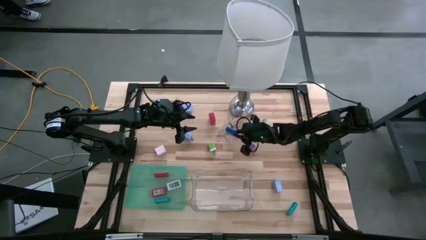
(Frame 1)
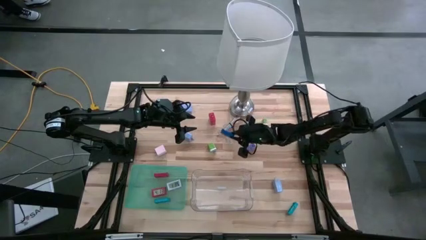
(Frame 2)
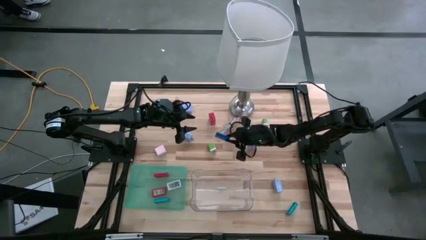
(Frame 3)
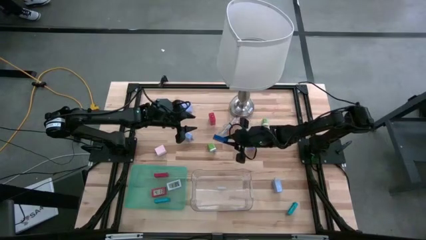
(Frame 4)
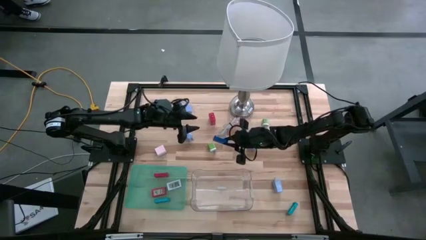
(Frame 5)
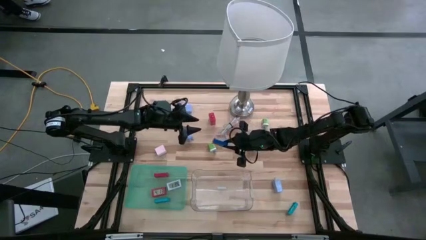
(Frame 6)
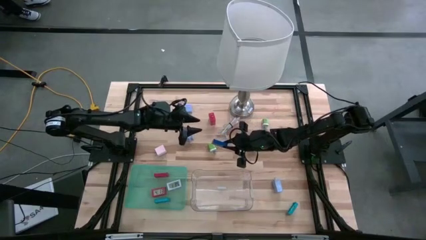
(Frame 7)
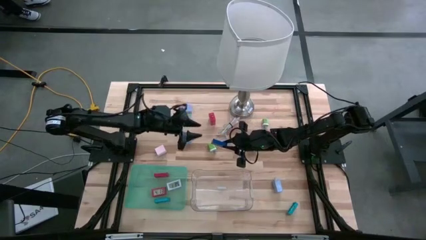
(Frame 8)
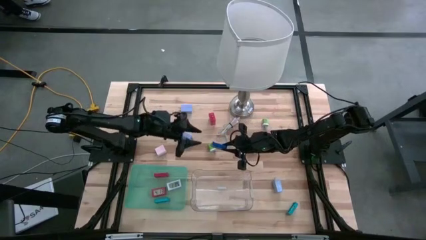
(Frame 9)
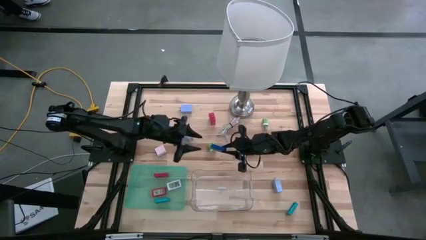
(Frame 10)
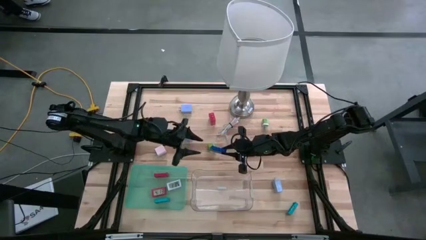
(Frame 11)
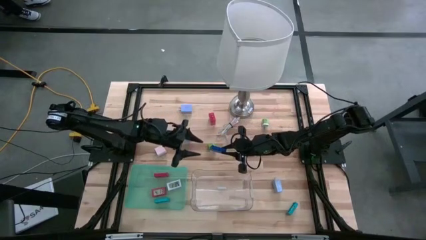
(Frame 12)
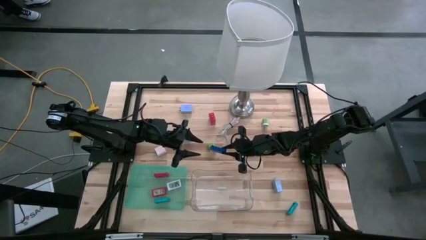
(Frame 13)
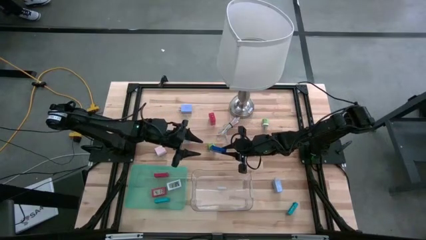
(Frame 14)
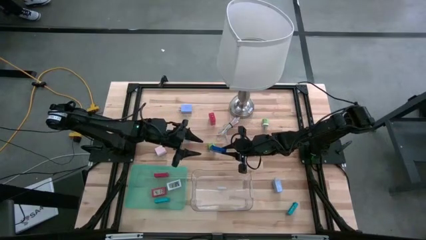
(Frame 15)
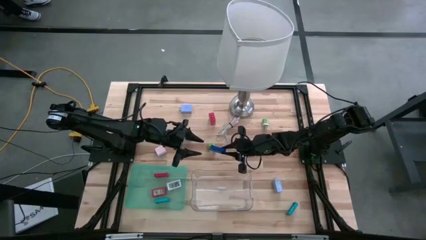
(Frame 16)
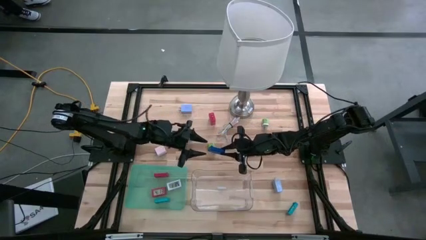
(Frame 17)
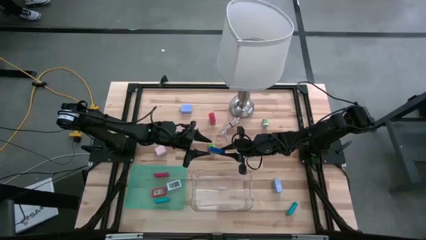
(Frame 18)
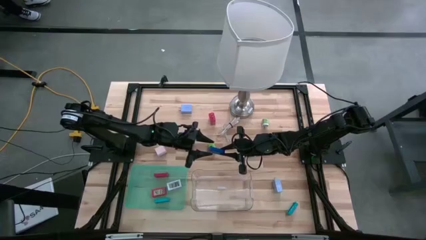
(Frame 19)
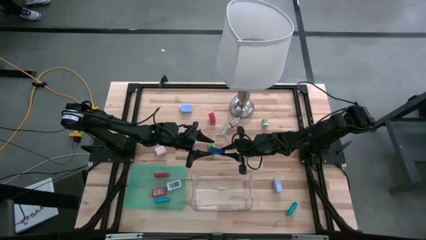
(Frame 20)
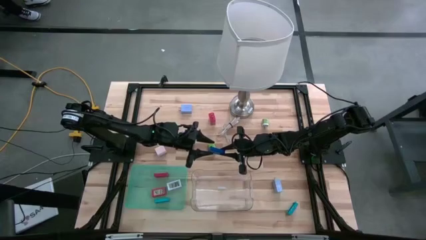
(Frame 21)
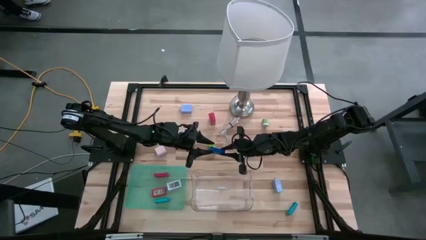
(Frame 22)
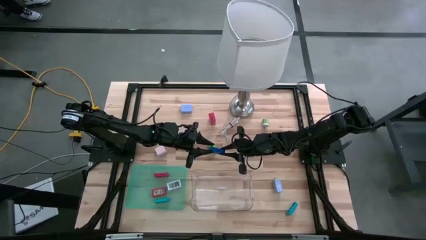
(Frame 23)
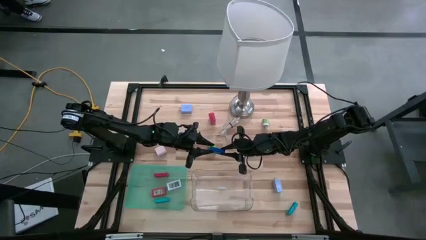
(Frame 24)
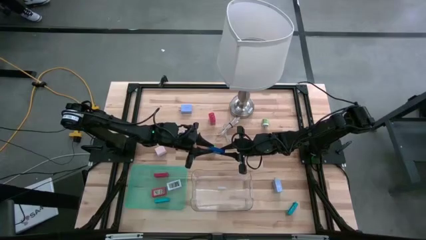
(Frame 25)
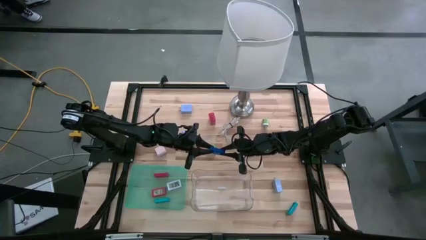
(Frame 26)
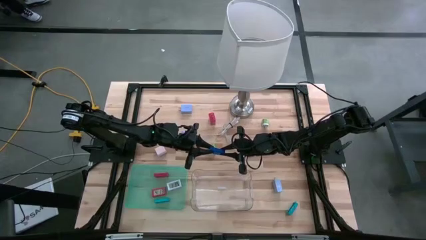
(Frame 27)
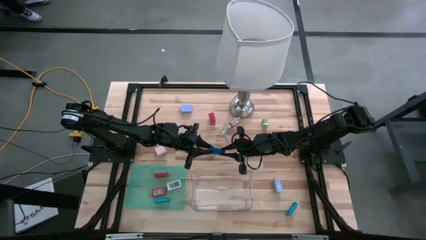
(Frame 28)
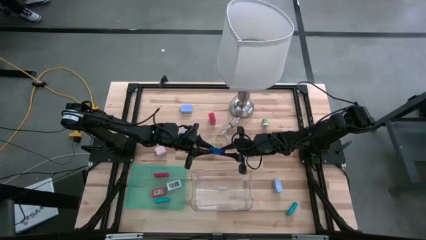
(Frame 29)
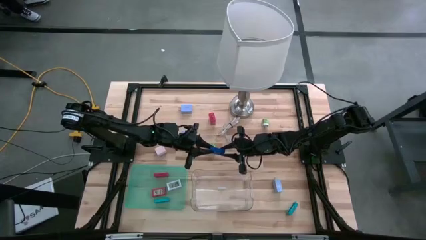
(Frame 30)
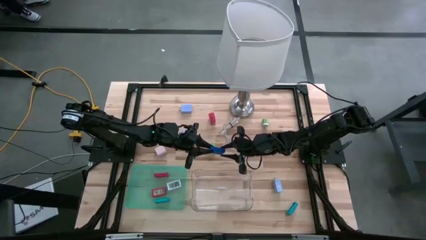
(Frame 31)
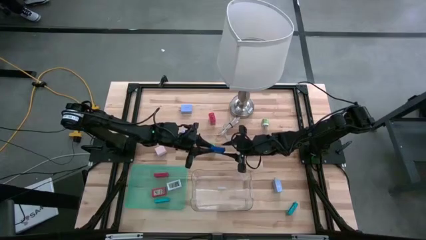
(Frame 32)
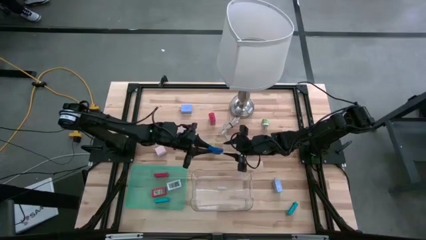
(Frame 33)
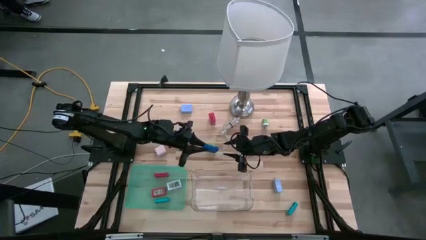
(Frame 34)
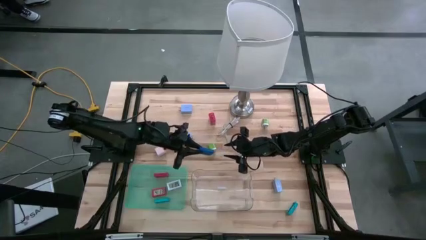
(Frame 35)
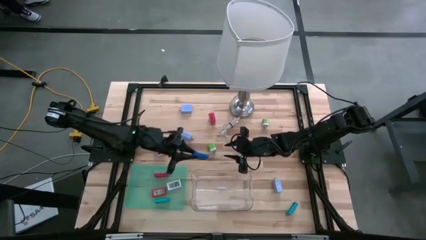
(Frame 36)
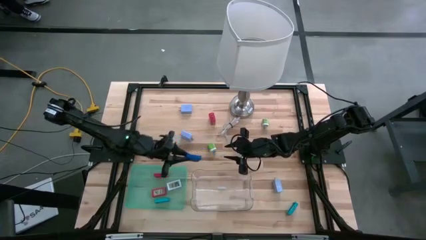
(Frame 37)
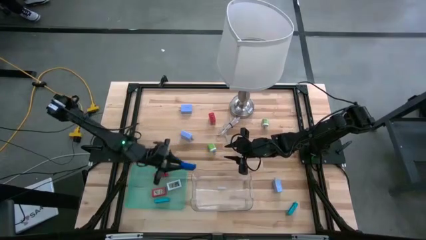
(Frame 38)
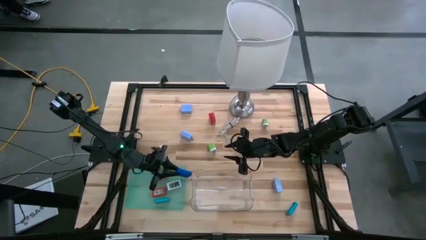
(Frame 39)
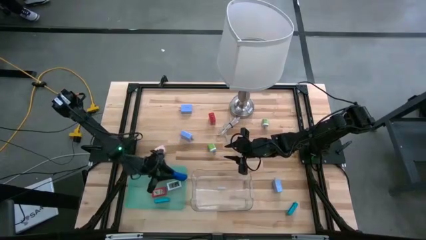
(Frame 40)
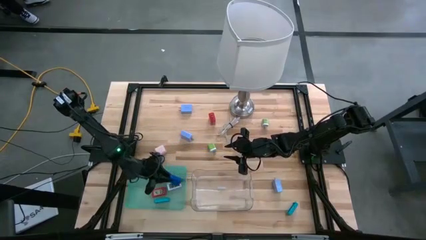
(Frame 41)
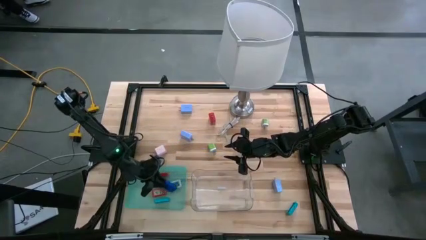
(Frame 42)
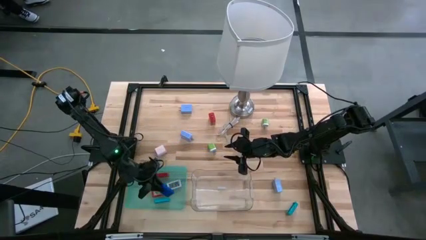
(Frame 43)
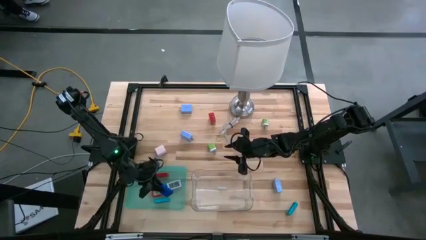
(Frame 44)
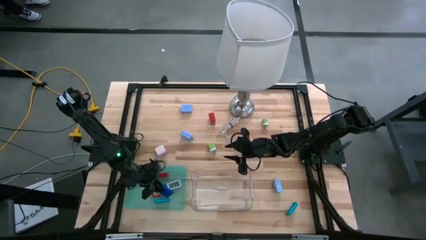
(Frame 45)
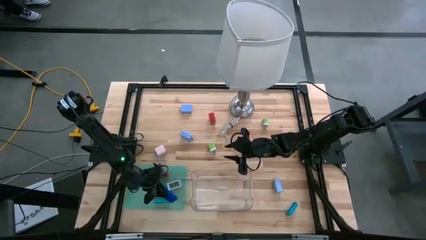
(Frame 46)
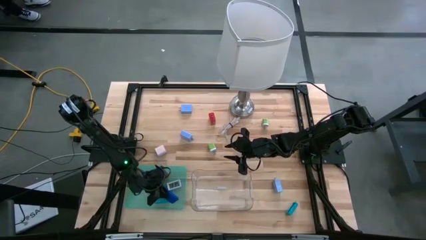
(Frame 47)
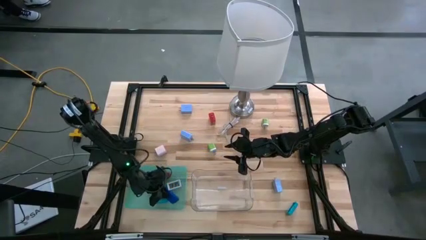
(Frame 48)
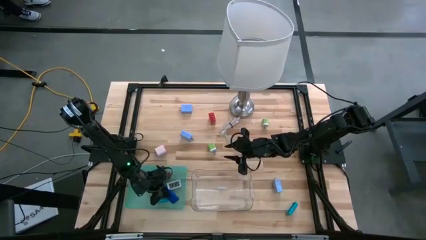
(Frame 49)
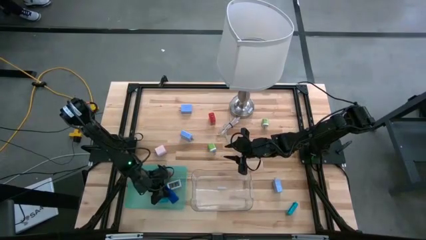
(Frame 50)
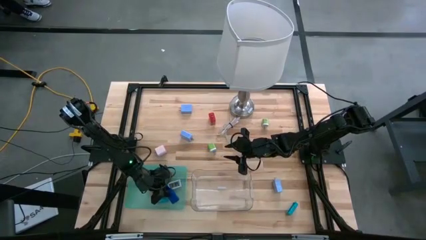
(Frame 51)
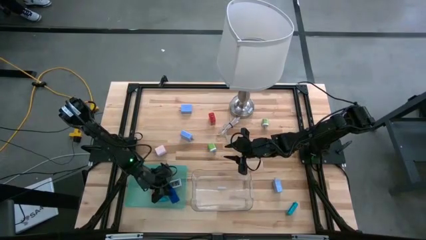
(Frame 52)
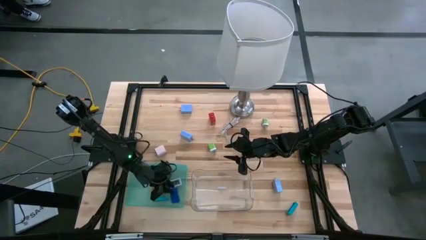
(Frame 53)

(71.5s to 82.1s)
Task: Pick & Place Office items
Put the blue timer into the green bin

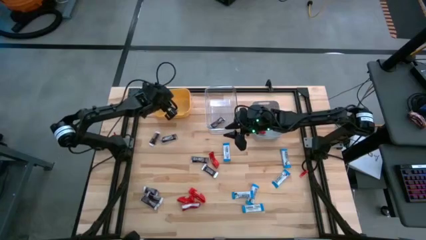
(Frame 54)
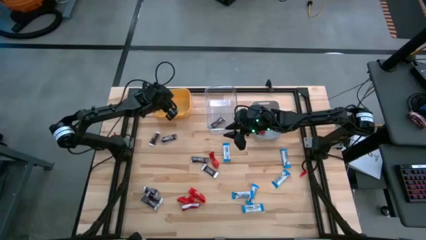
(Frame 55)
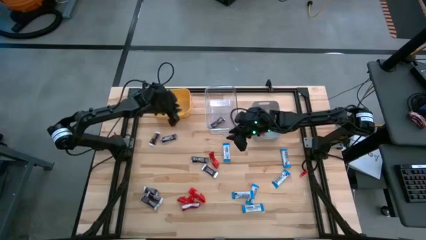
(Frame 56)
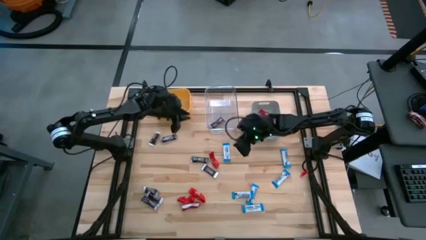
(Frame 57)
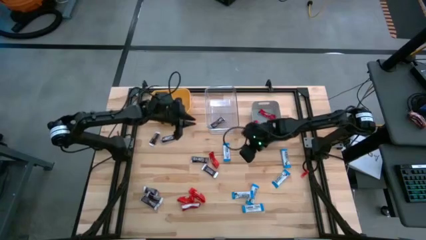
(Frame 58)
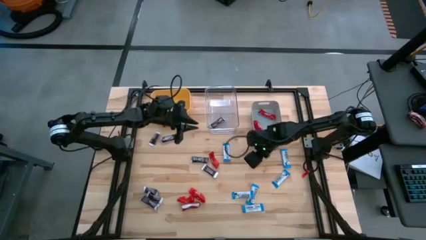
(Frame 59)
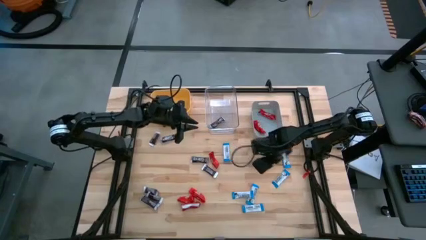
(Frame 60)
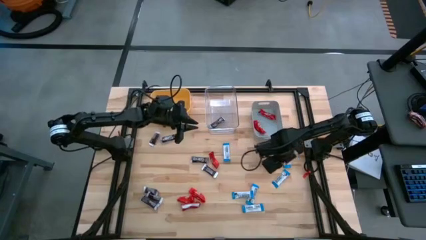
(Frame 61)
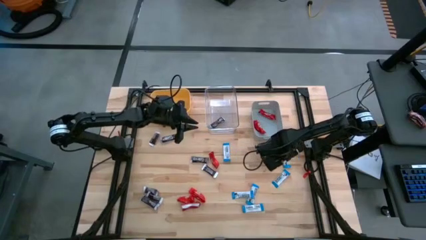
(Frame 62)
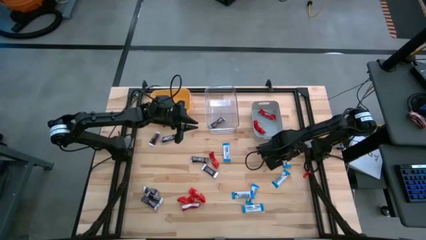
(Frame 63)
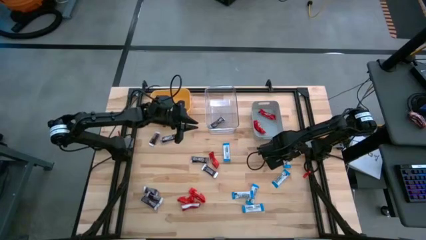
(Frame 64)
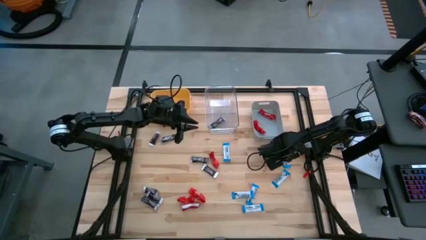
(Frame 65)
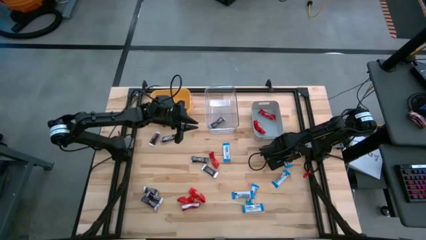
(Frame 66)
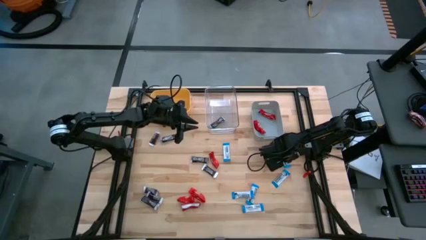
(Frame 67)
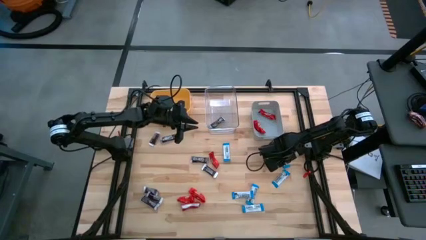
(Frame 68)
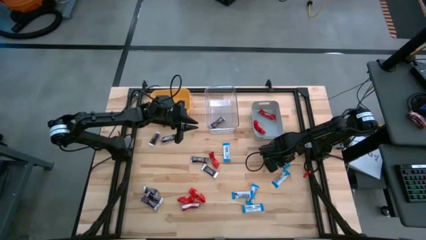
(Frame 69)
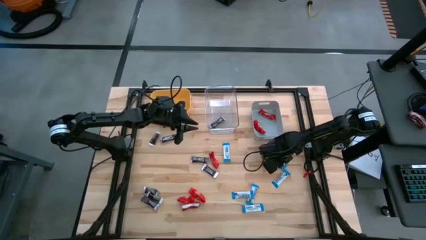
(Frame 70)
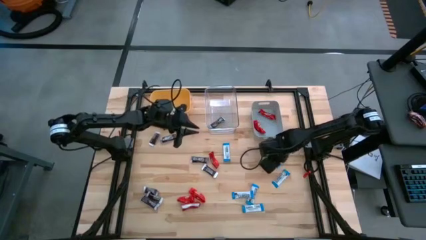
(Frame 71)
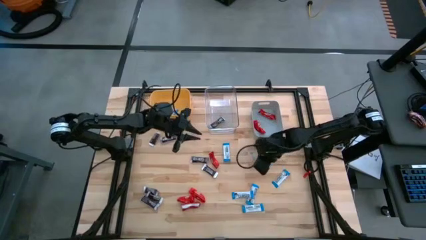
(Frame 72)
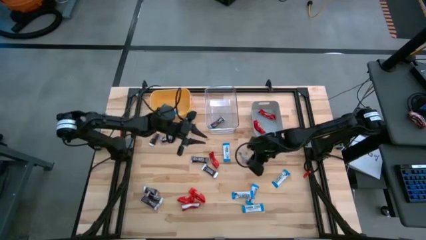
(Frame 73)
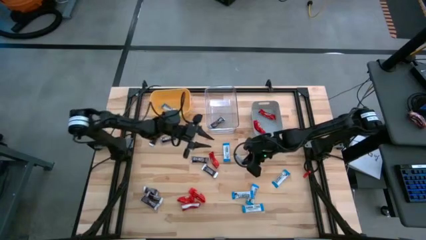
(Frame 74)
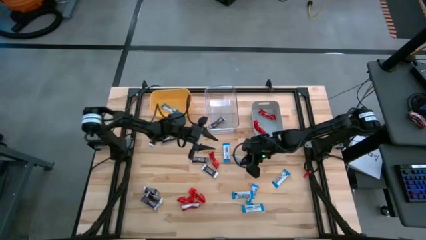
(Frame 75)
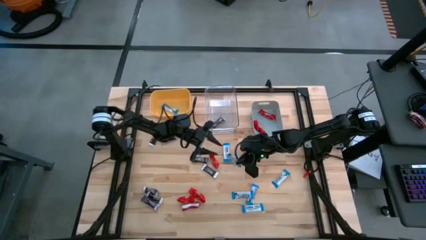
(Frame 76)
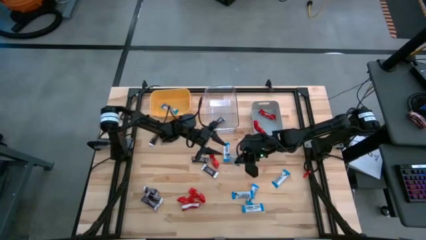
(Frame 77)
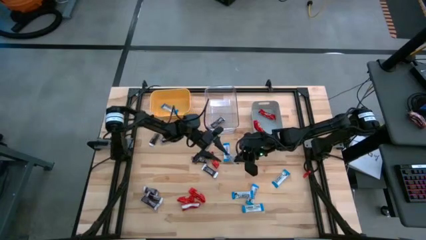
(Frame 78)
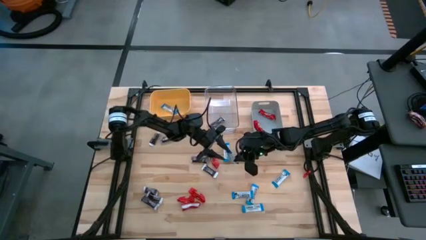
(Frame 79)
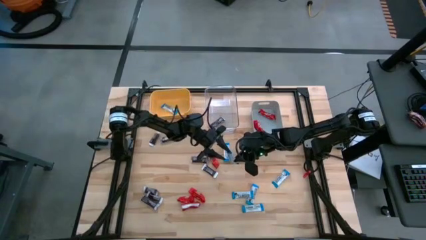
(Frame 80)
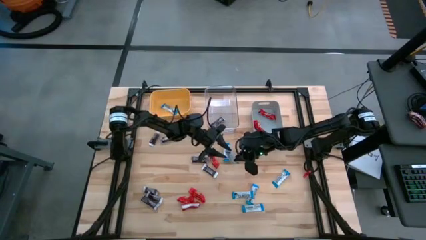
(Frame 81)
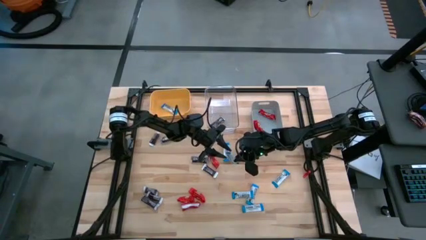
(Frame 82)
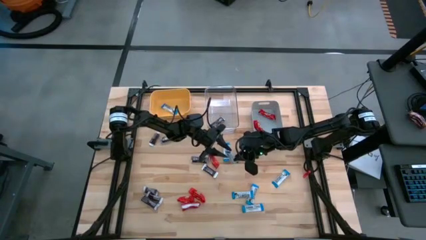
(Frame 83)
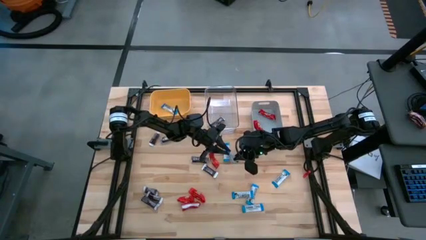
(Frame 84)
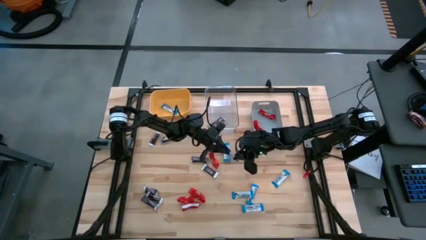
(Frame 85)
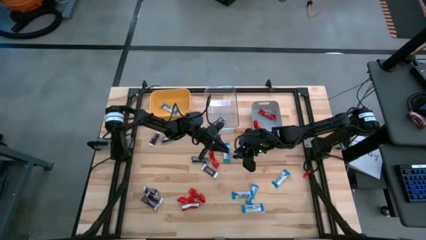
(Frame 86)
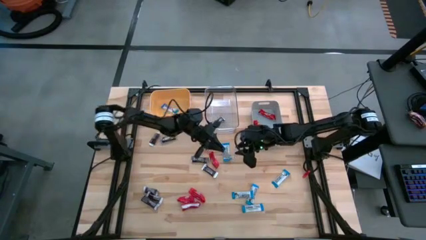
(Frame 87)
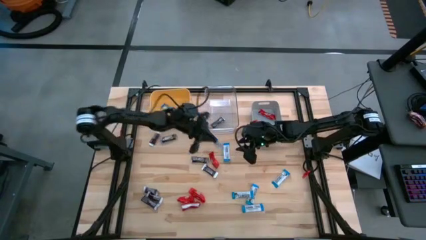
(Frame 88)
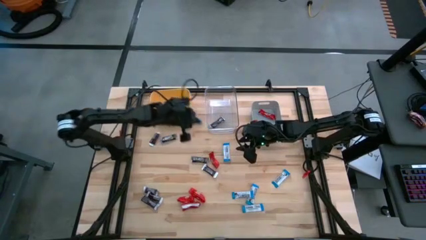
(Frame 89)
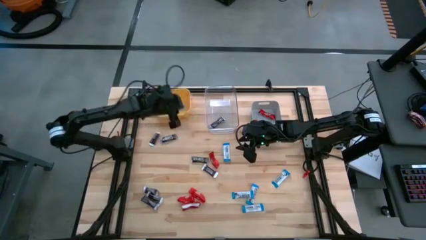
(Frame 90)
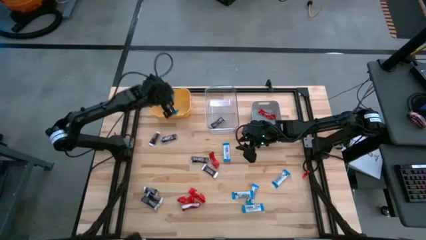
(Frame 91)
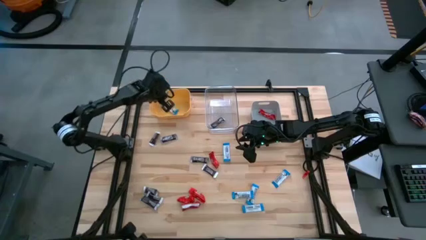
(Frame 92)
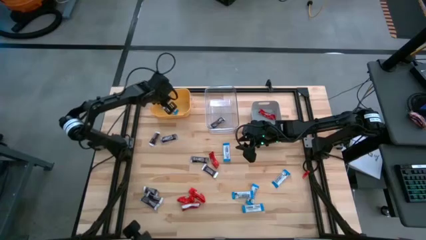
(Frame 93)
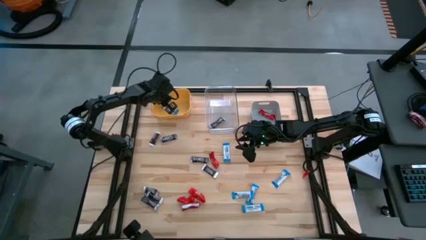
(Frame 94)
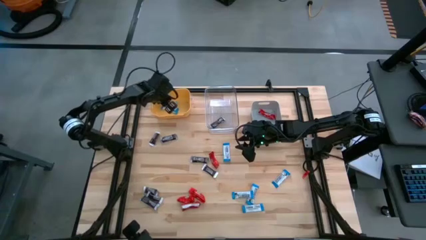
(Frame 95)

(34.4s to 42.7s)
Task: Sort candy
Put the white chocolate in the yellow bin
